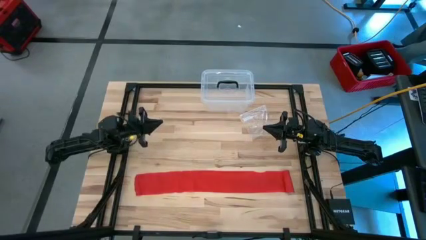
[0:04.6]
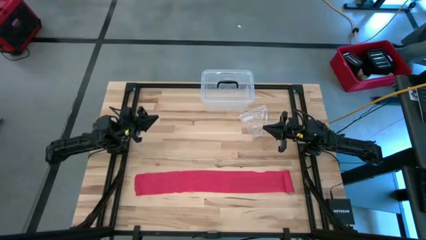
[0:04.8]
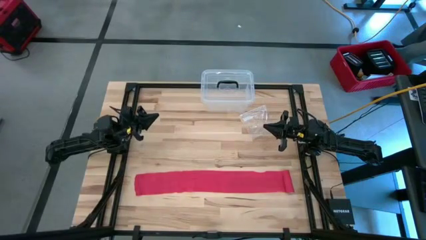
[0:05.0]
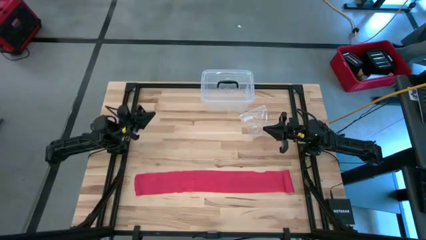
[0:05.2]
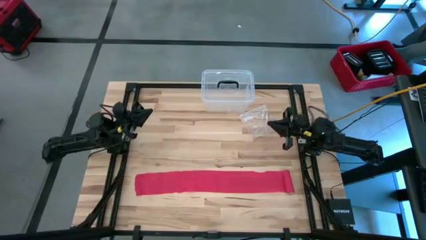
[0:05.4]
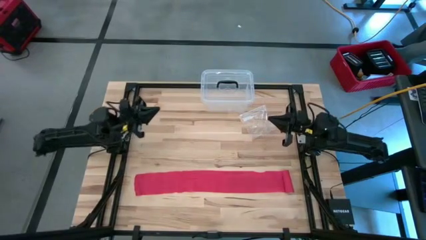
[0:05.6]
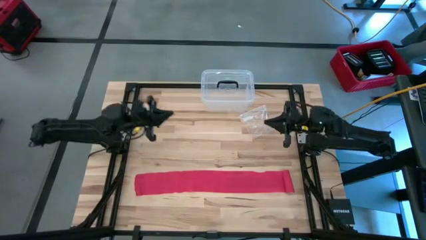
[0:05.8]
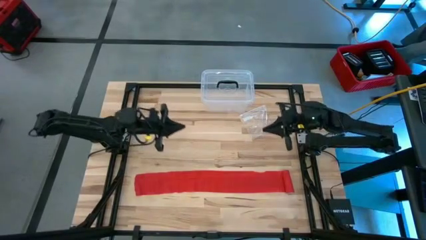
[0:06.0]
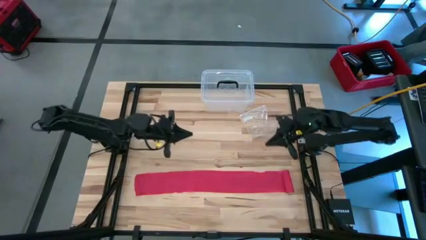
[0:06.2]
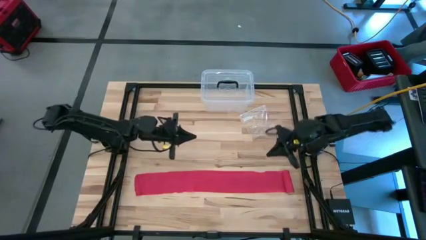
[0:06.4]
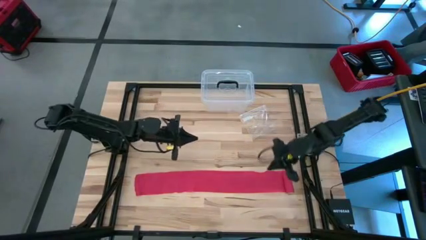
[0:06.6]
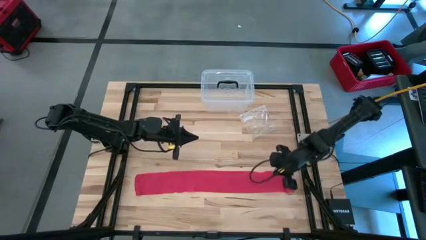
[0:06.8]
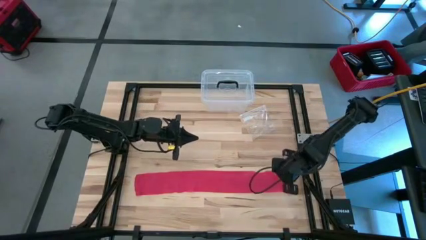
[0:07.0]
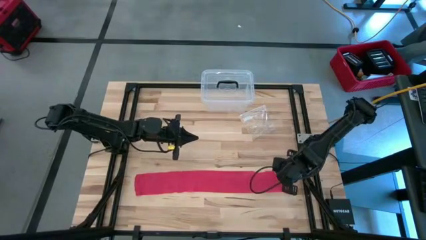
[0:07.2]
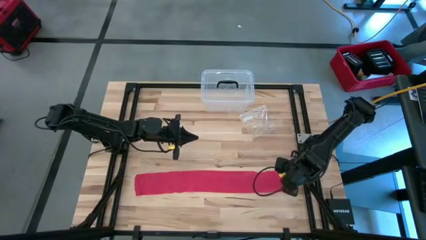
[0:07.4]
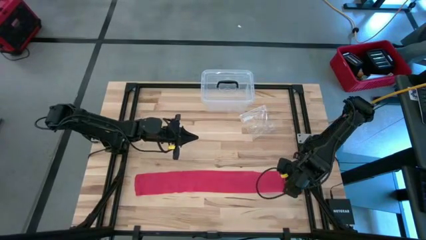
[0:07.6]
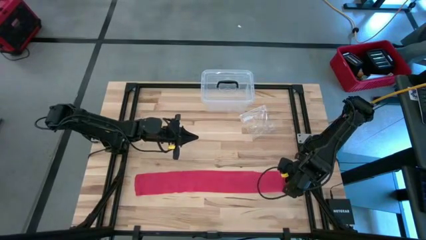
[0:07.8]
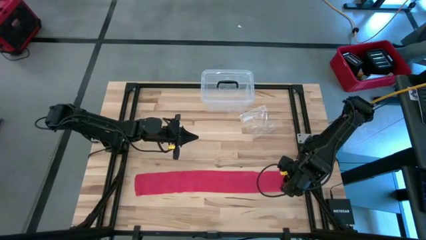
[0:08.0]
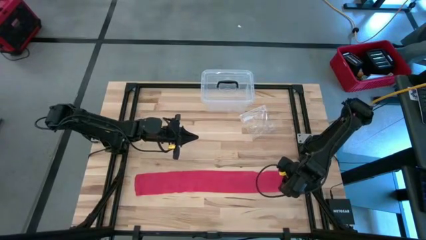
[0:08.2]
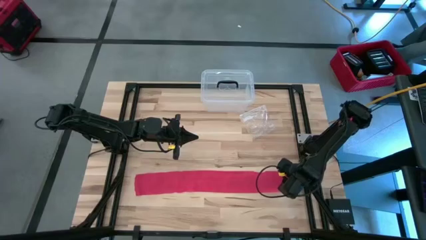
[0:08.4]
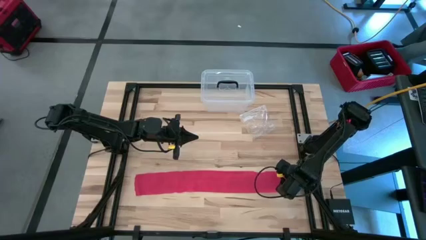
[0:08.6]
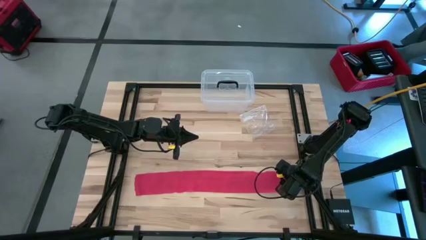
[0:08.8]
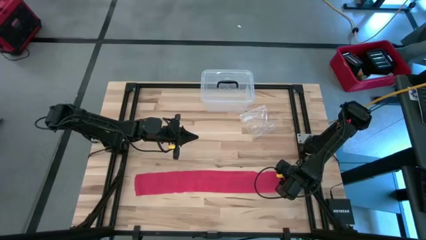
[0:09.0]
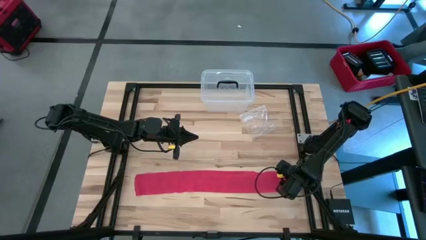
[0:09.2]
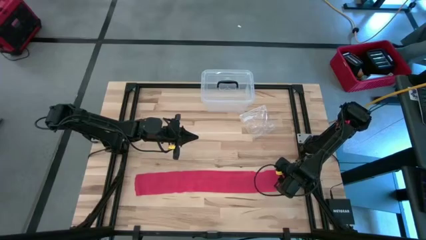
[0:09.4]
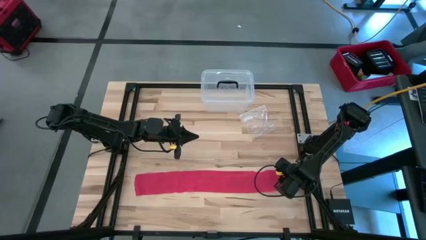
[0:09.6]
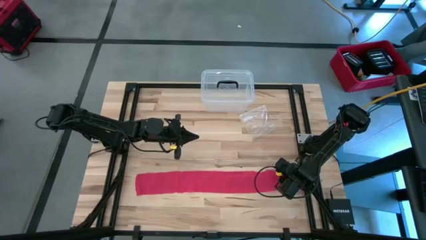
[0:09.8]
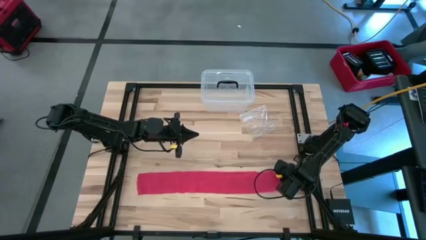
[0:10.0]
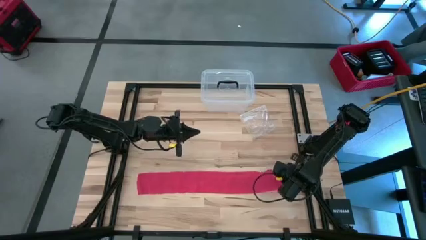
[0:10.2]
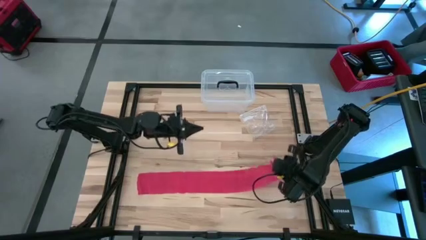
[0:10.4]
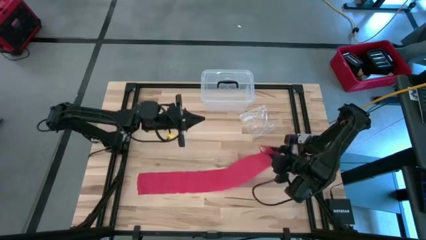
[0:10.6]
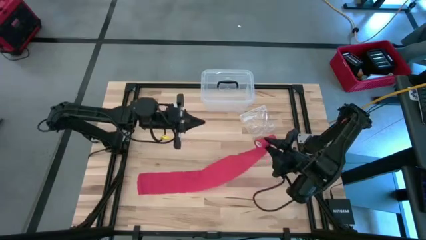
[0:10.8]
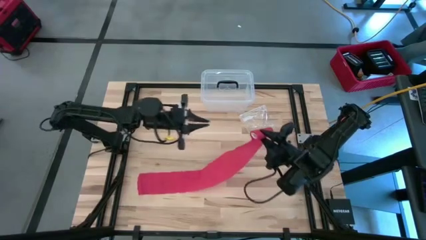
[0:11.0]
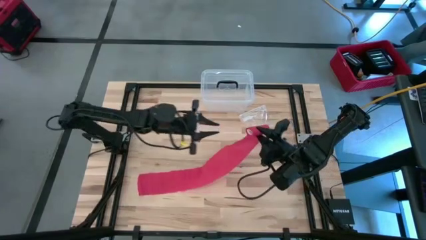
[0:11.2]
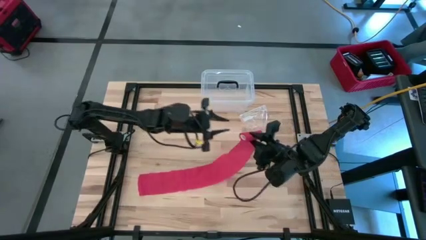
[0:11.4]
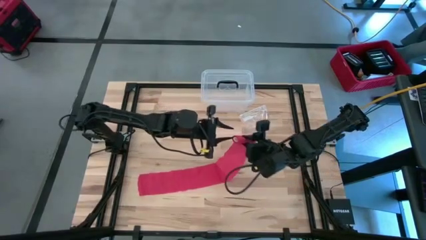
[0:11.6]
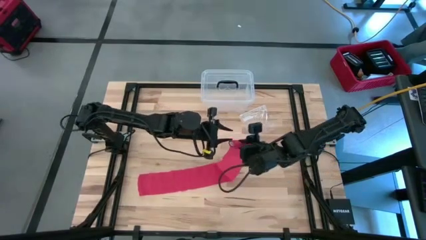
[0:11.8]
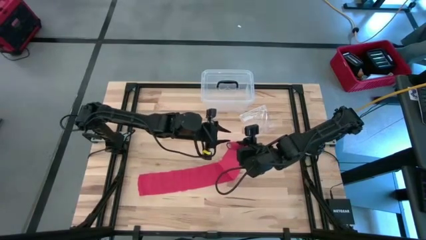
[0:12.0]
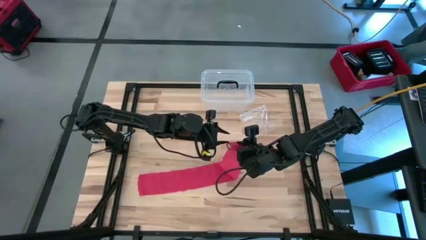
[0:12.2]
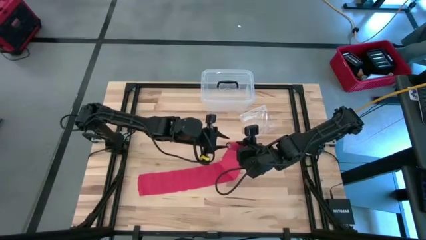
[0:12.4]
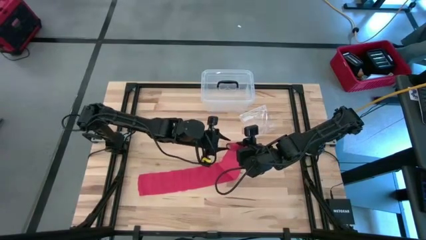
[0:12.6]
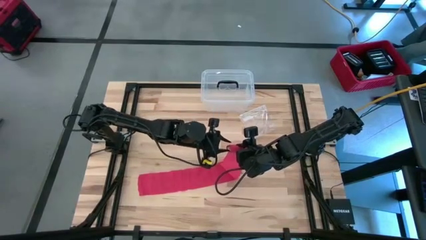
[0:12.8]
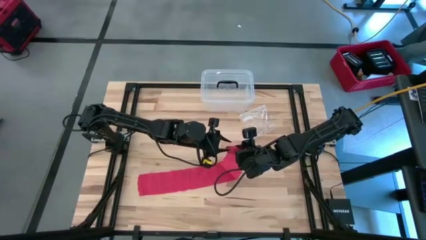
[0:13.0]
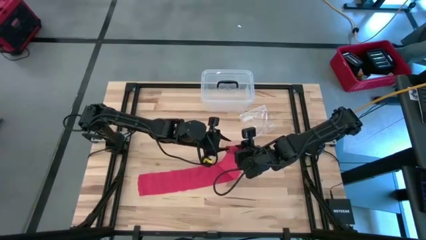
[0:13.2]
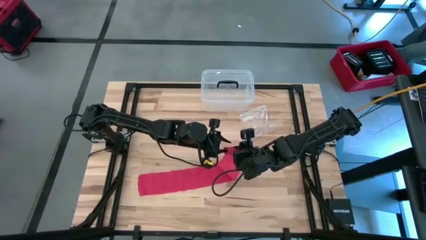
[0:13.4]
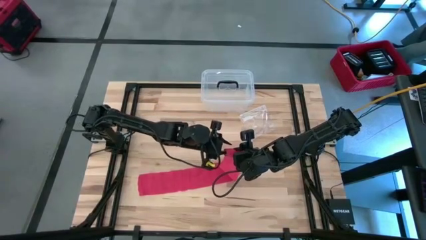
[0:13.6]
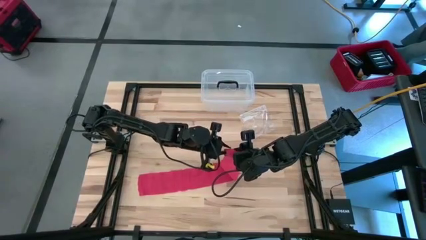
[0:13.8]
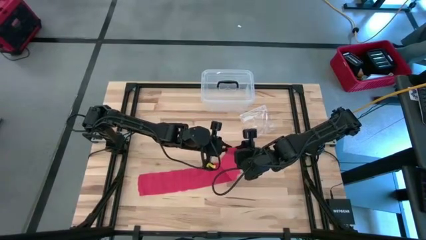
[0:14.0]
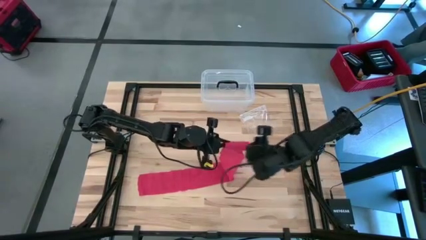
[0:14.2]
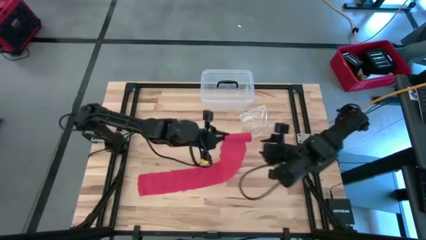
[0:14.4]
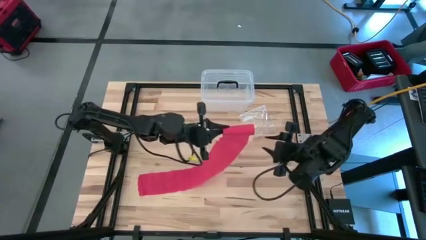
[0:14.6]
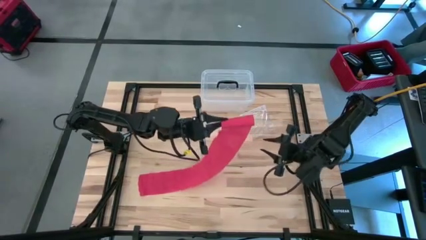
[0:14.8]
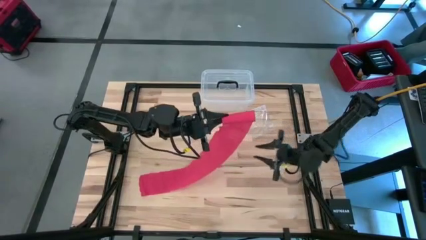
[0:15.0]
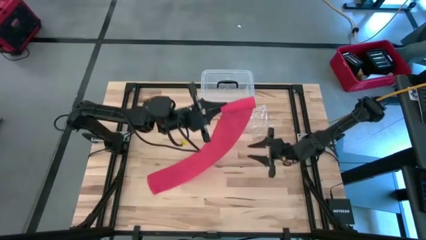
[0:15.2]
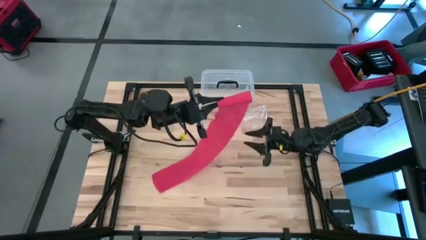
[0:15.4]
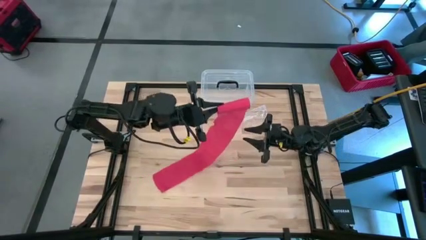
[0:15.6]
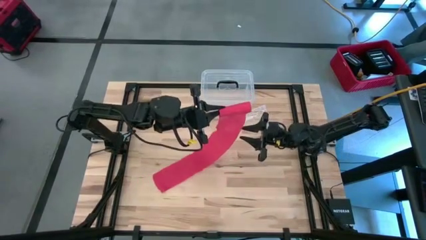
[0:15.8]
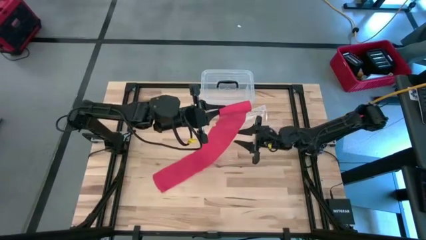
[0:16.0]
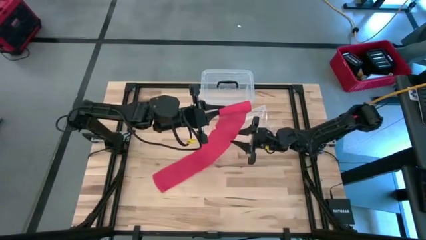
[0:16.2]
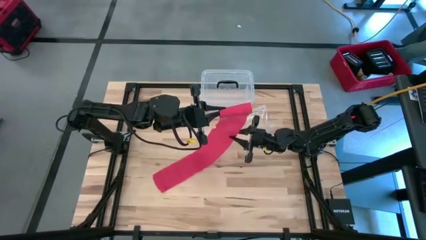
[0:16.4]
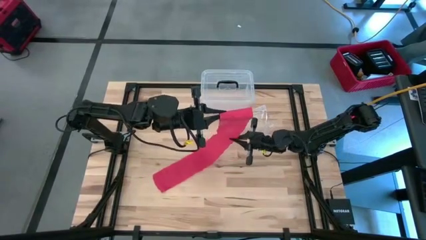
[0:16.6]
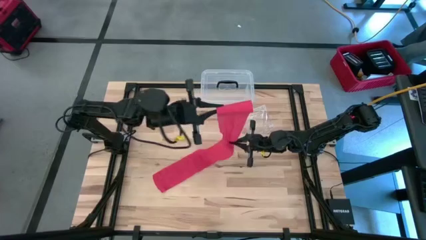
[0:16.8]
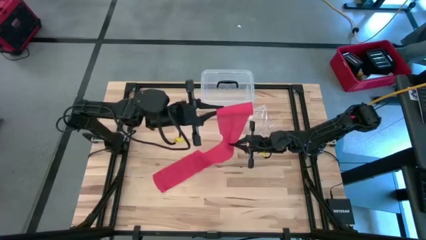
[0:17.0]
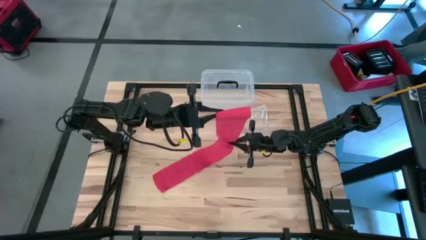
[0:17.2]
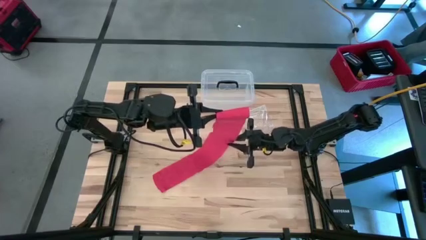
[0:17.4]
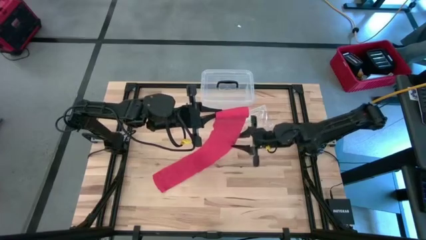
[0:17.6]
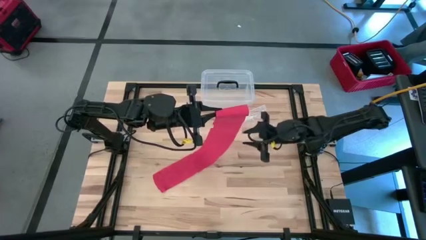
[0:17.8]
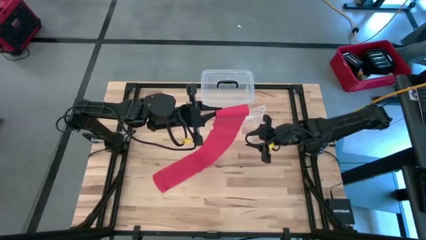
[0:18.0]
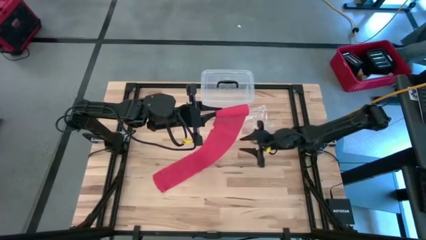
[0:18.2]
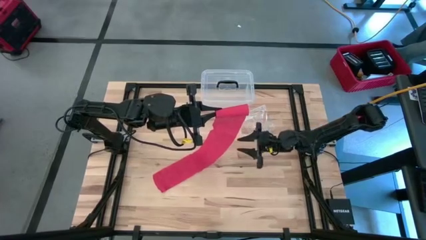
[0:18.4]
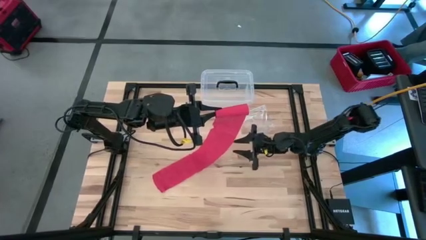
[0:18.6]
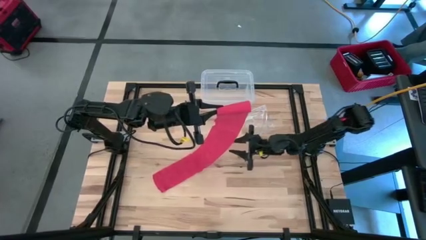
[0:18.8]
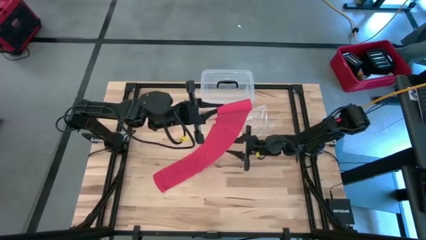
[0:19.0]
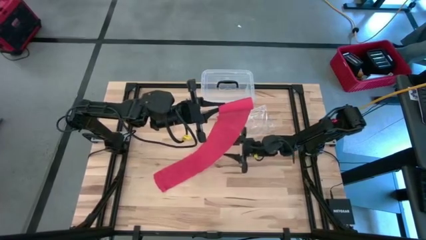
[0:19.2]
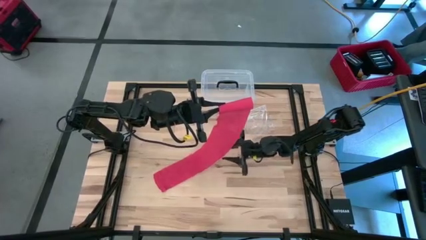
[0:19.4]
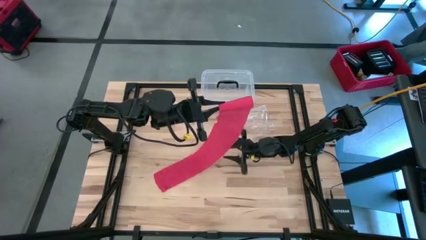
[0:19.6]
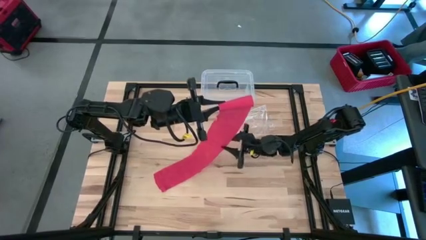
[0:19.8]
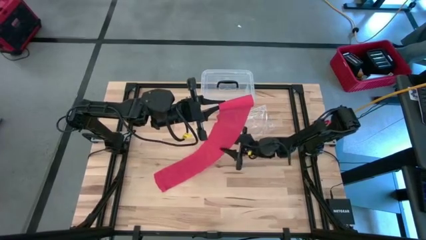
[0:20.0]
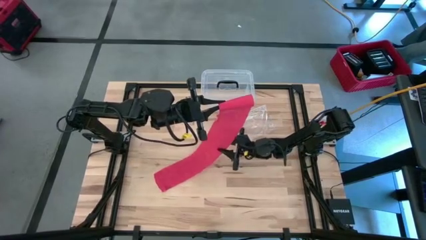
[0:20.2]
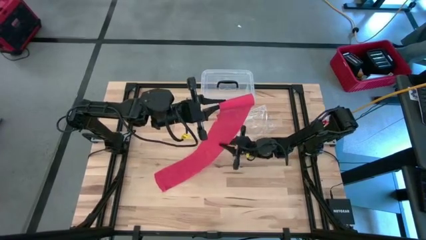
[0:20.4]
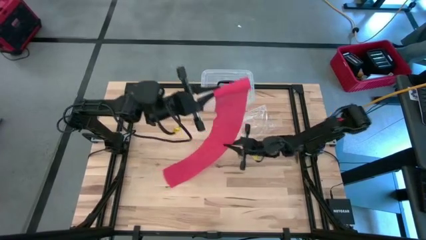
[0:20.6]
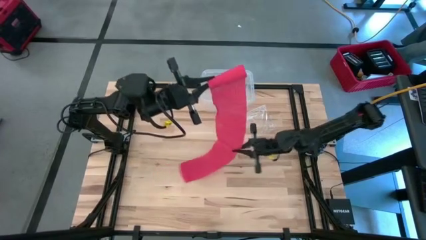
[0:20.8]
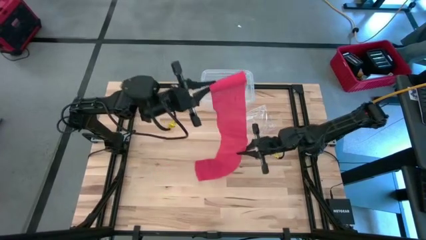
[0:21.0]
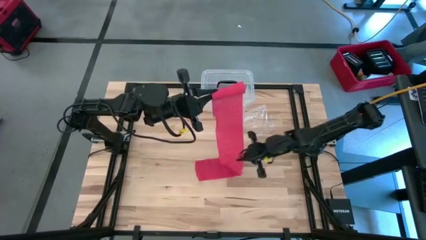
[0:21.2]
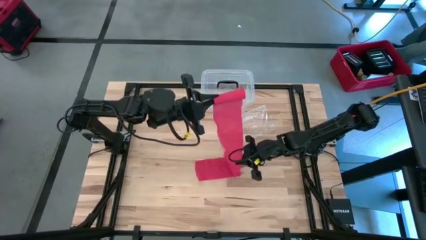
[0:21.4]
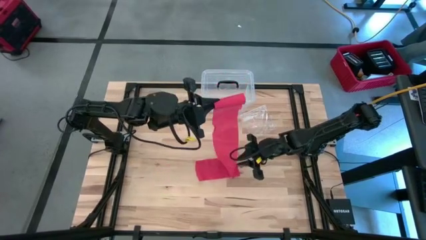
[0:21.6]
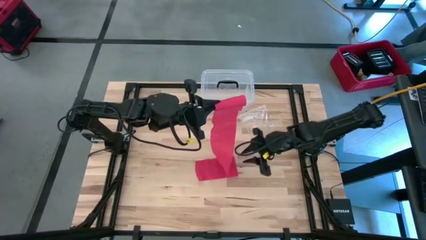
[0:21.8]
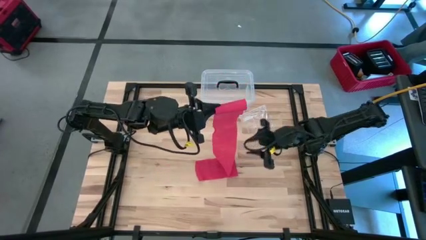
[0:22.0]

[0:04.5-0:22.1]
Task: Roll bandage
Roll the red bandage
